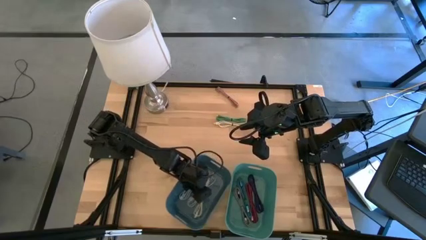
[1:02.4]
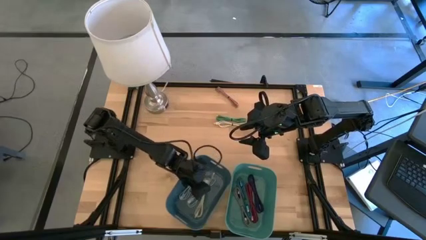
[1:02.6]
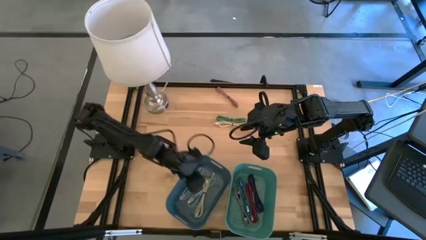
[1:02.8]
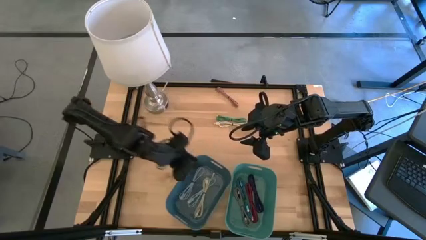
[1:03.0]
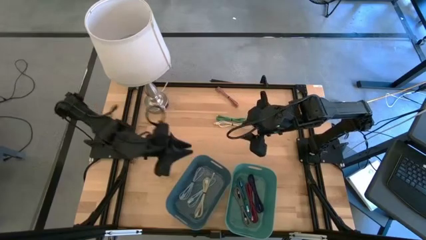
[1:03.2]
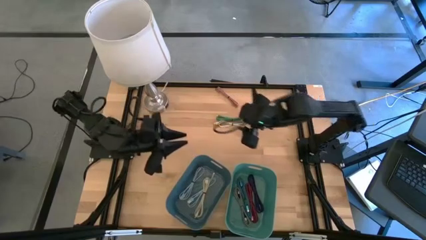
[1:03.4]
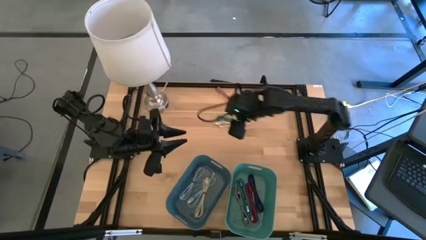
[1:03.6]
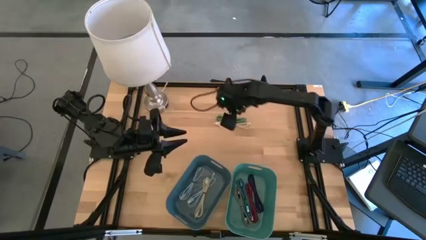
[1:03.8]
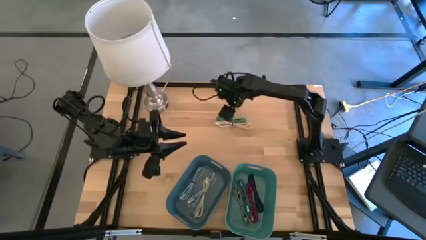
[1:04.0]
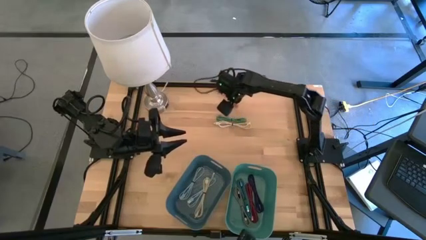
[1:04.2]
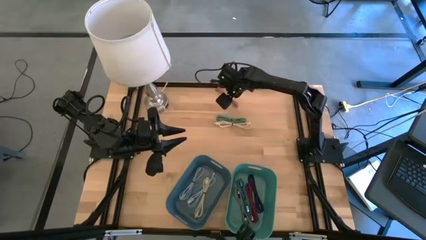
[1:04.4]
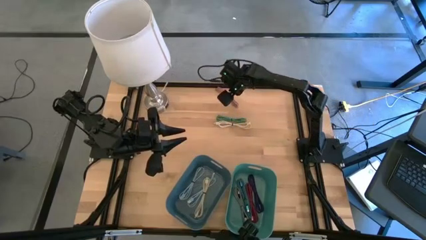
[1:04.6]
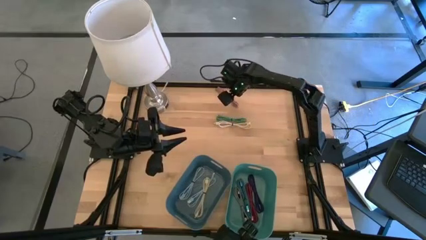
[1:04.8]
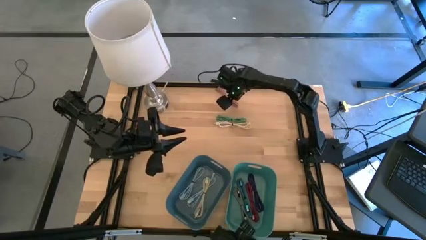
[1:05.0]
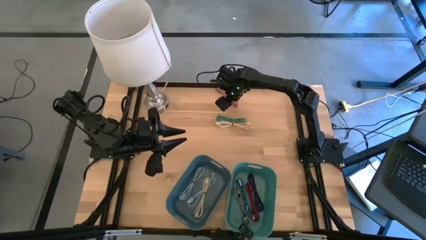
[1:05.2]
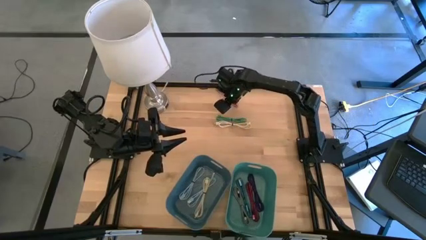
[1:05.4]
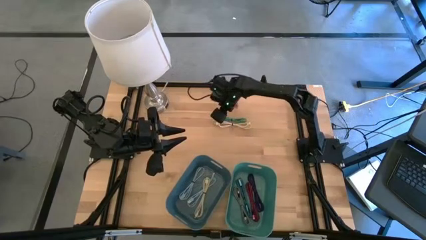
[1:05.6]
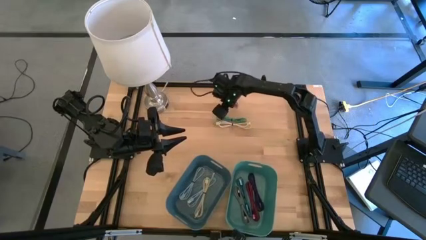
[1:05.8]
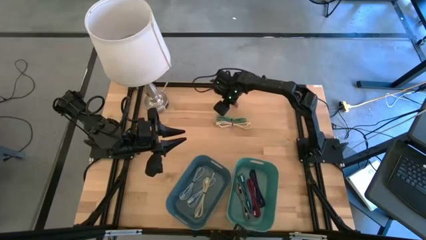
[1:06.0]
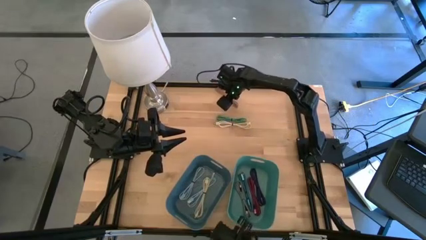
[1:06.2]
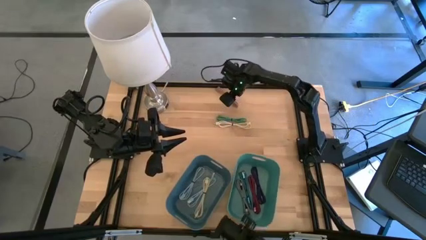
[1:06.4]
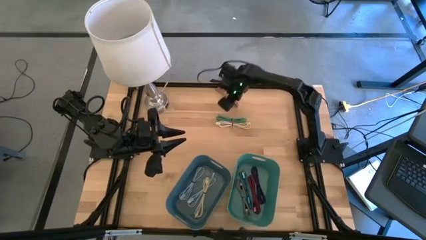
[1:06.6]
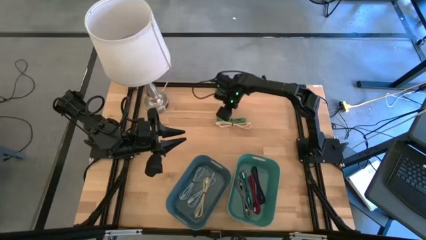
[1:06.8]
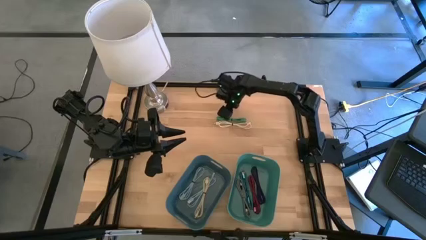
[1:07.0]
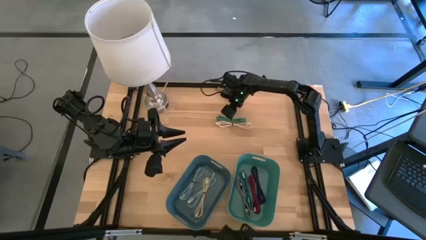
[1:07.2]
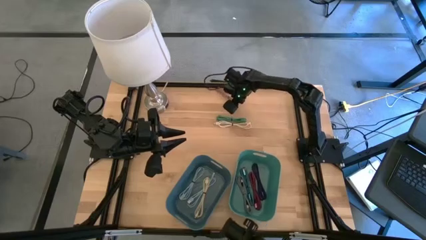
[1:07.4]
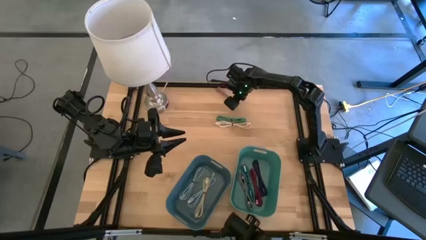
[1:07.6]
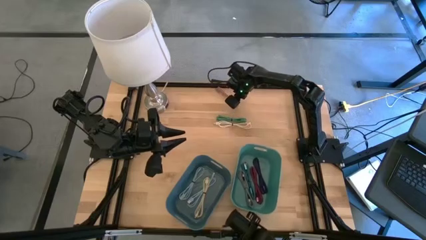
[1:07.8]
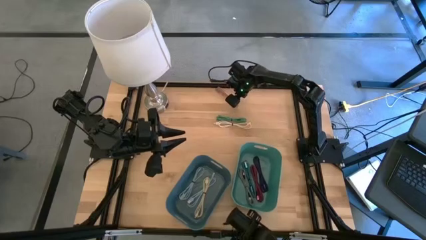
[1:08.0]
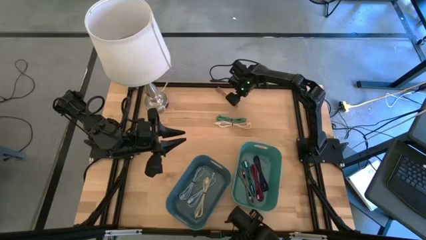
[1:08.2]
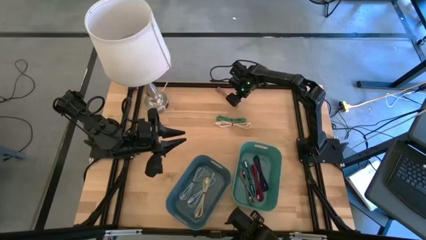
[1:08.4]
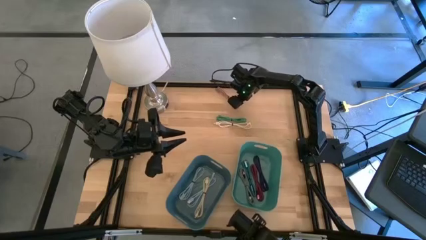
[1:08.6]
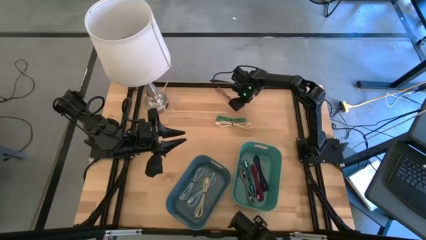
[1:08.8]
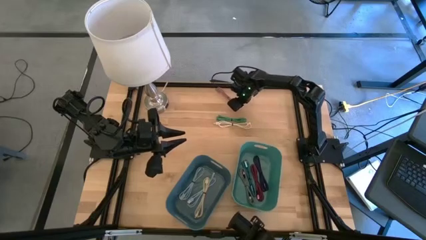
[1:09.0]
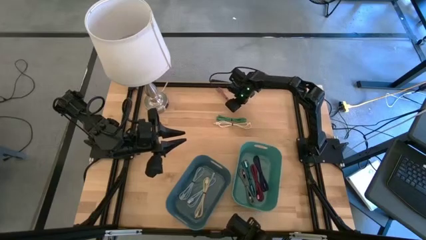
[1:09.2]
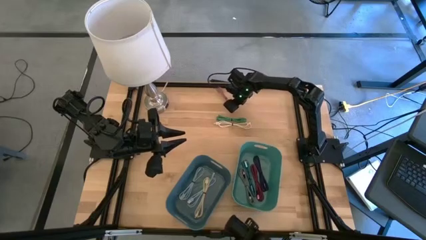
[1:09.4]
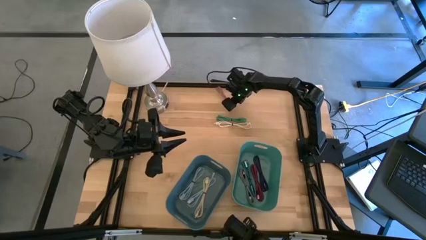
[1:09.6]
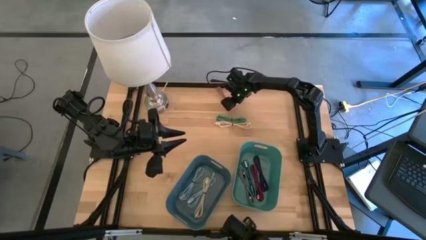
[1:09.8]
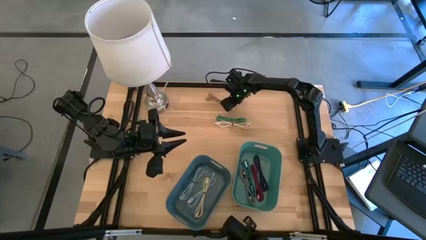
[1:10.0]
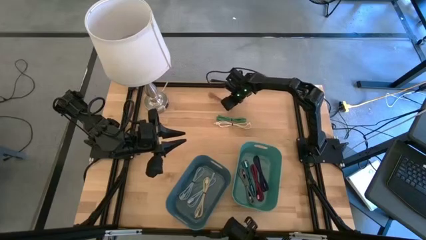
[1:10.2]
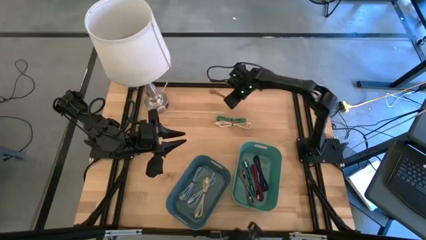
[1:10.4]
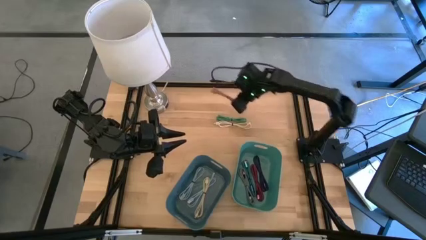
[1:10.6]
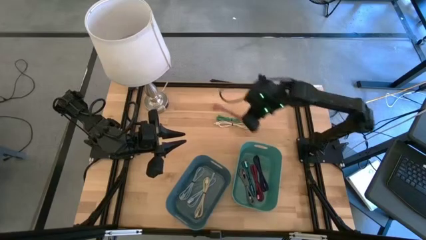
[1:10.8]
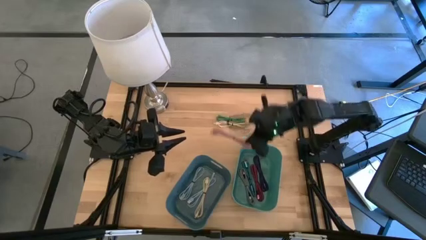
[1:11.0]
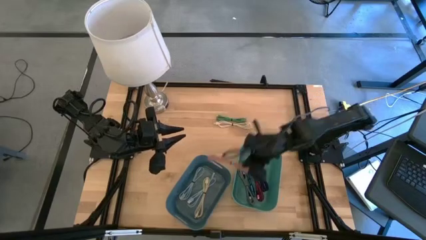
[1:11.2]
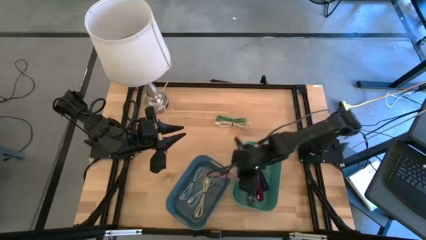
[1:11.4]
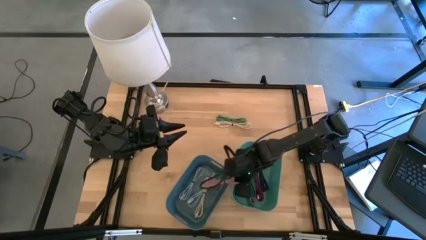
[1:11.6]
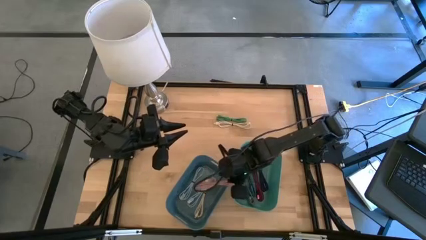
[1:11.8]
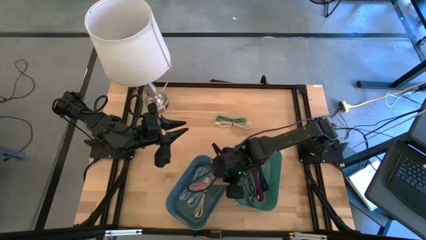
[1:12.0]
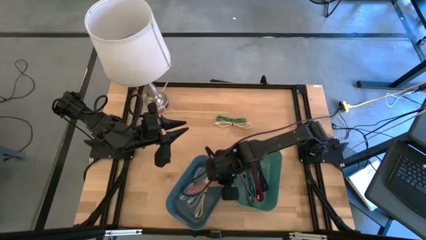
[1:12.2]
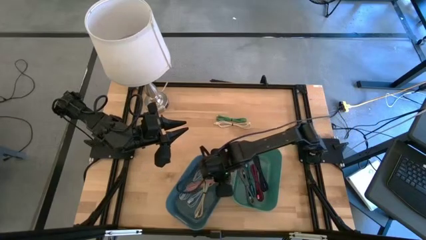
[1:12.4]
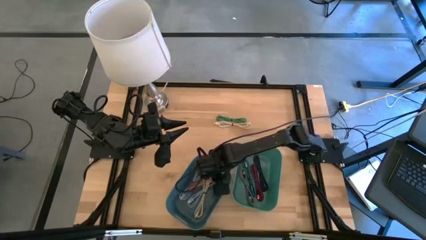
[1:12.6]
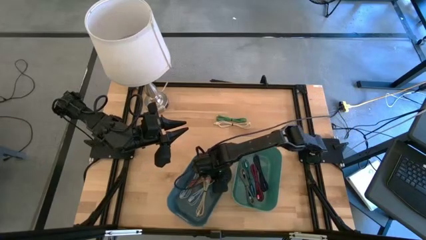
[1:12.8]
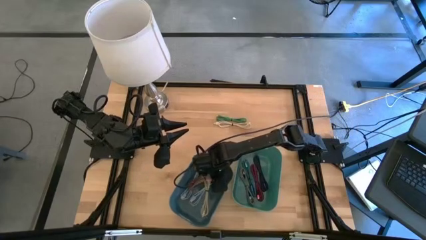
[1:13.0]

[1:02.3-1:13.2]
Put the pink charger cable into the blue container

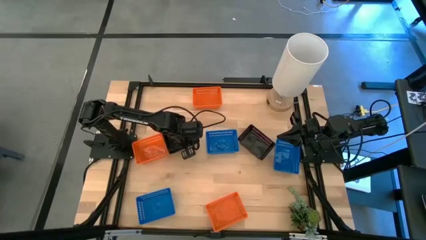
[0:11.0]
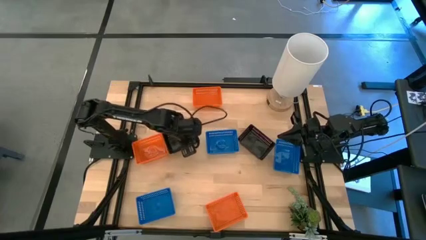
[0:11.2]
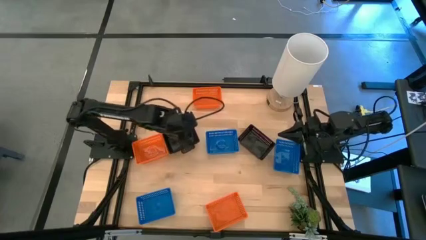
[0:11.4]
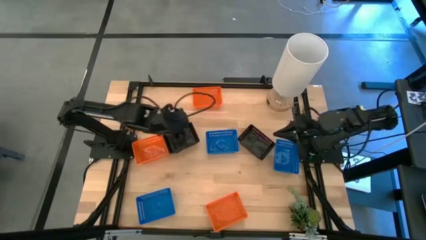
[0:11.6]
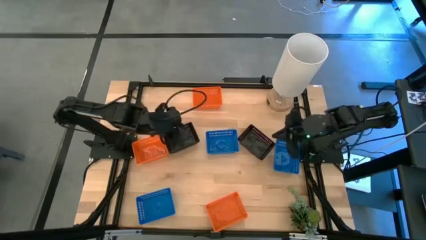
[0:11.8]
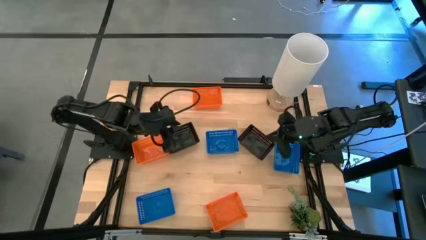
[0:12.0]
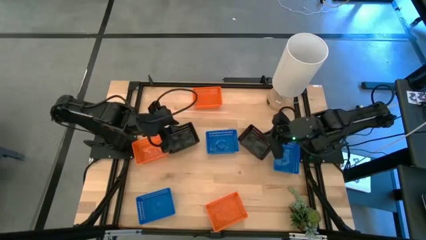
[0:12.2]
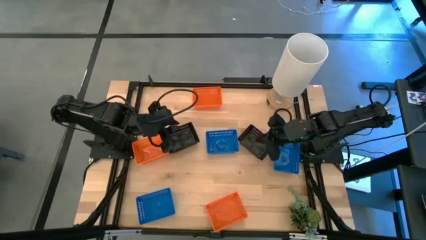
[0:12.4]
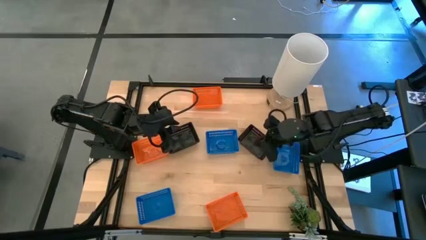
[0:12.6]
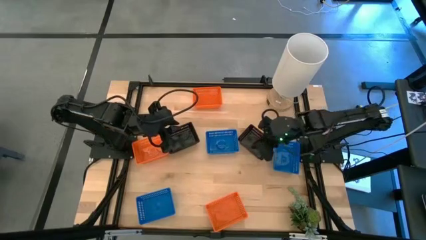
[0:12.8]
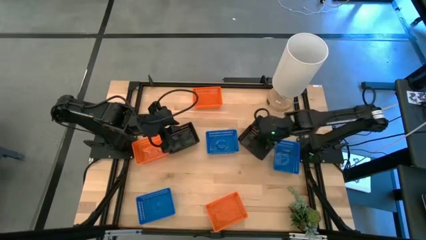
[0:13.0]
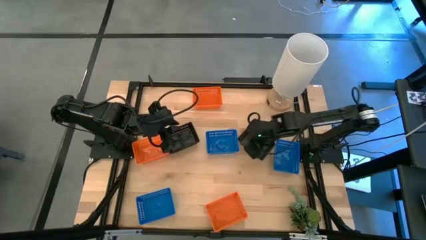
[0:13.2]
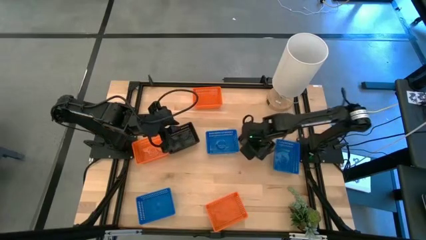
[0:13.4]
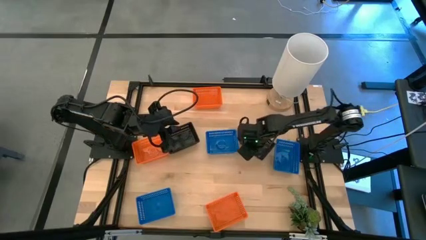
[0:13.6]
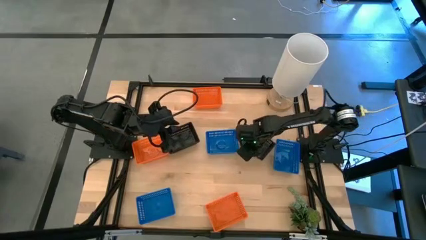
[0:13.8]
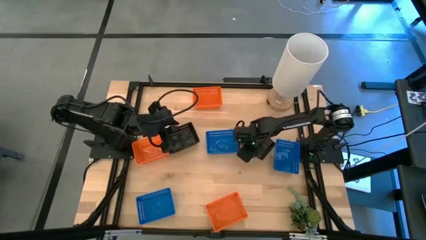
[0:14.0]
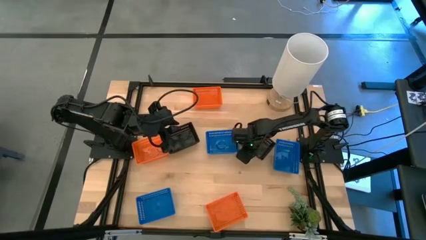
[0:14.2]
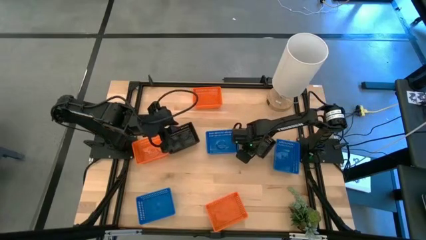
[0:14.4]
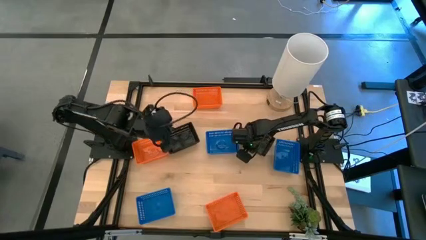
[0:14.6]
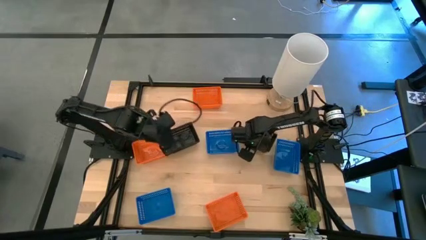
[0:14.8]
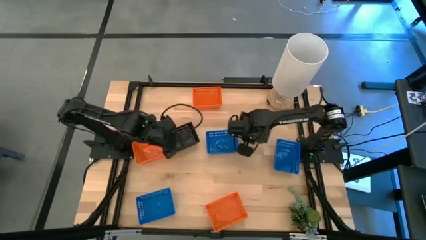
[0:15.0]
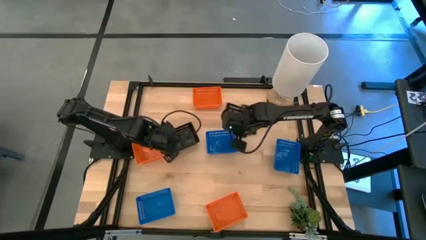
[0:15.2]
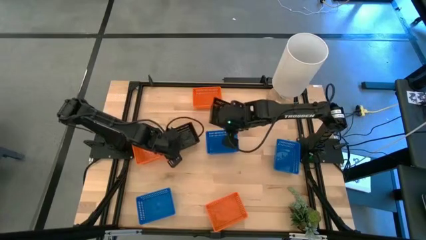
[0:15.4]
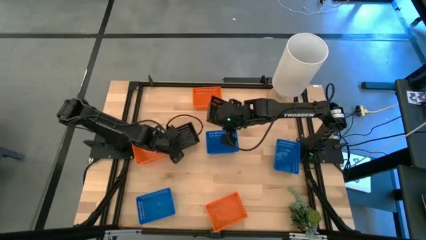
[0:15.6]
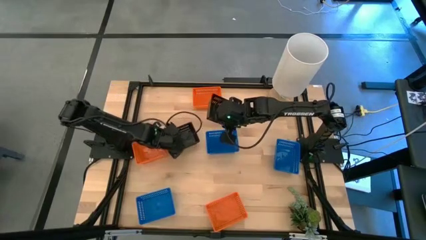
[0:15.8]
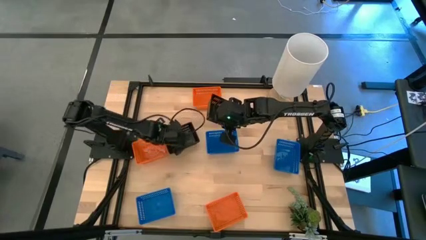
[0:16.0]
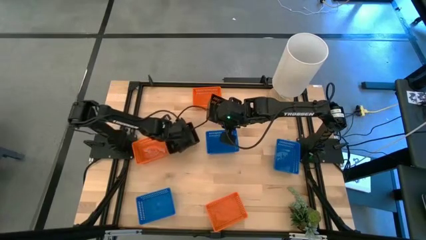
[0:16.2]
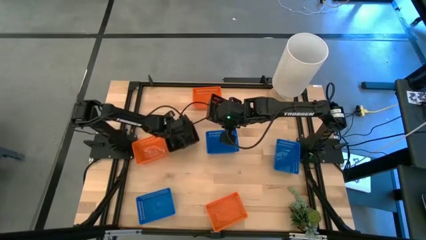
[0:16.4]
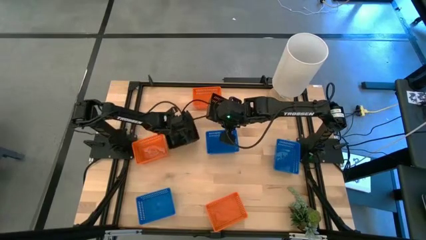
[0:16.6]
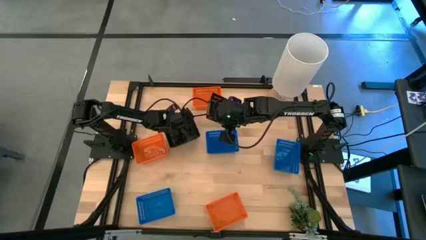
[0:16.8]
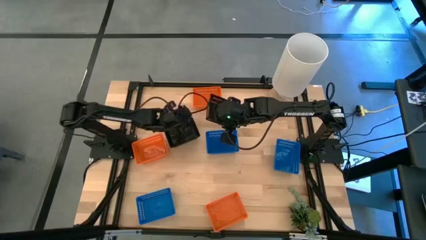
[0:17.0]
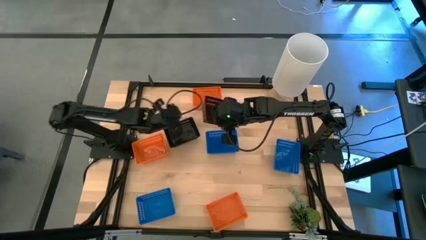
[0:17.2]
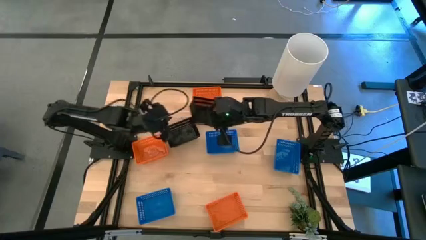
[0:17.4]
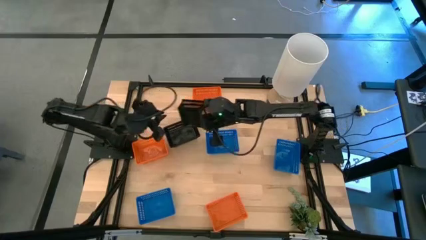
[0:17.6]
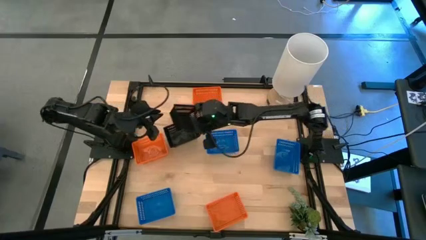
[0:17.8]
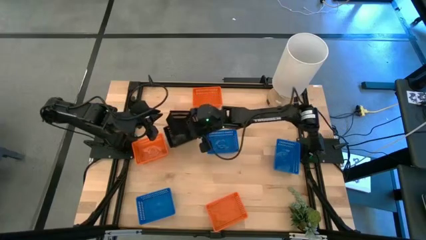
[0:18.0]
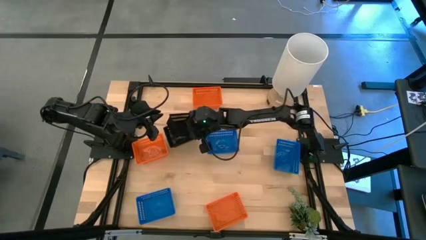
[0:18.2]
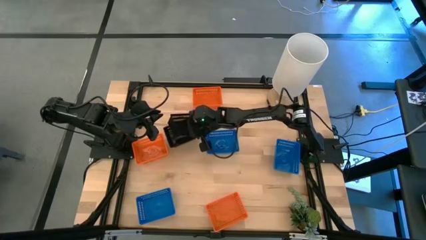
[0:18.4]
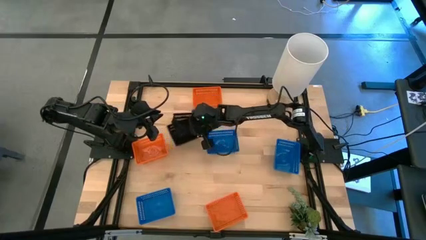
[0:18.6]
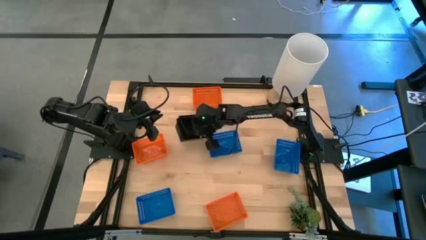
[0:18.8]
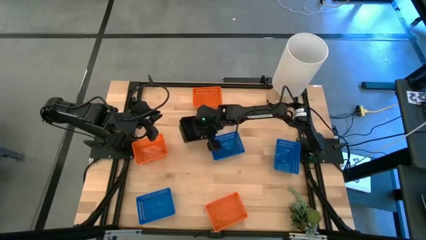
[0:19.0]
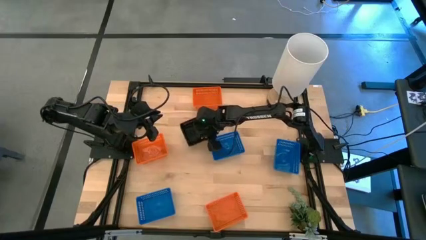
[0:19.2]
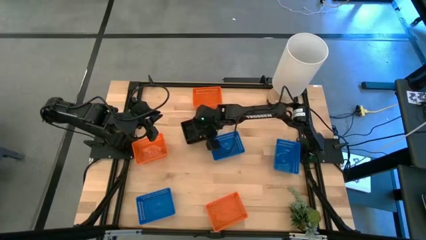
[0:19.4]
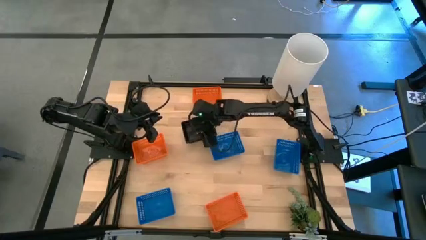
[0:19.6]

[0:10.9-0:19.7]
Stack the right black bin on top of the left black bins
